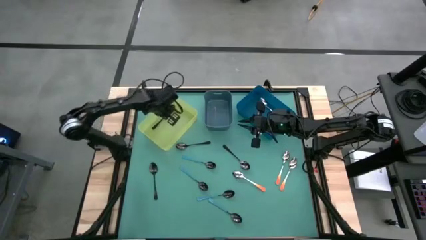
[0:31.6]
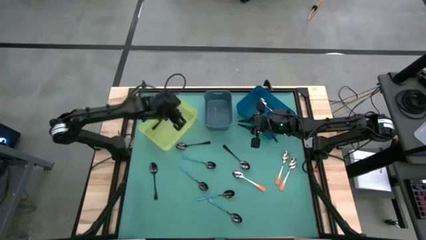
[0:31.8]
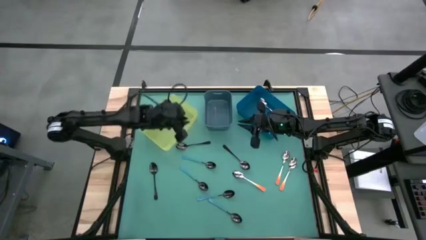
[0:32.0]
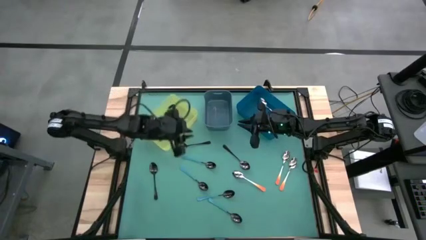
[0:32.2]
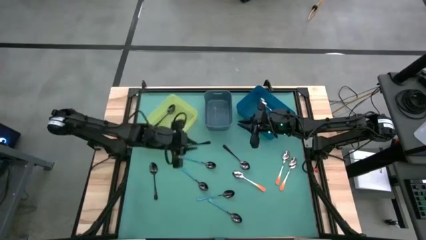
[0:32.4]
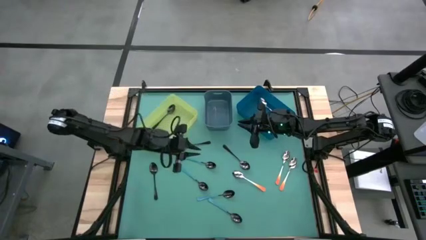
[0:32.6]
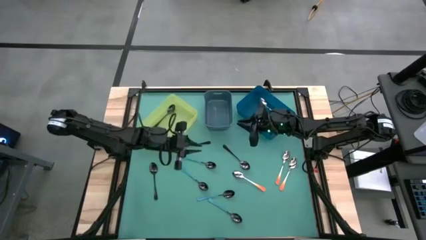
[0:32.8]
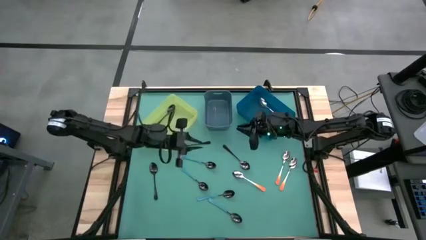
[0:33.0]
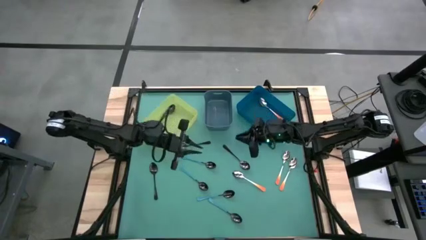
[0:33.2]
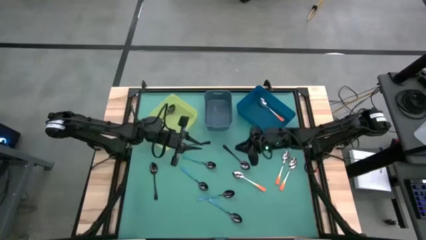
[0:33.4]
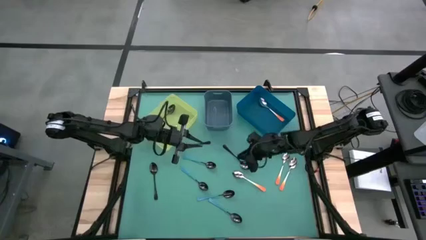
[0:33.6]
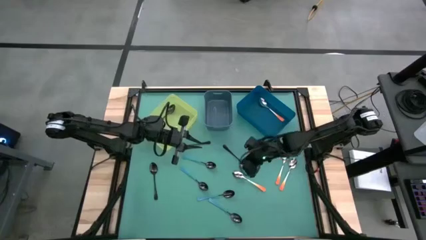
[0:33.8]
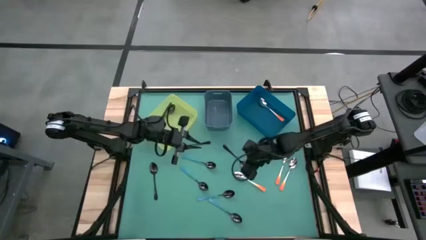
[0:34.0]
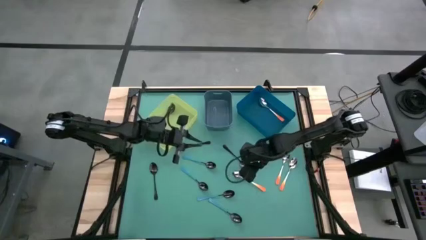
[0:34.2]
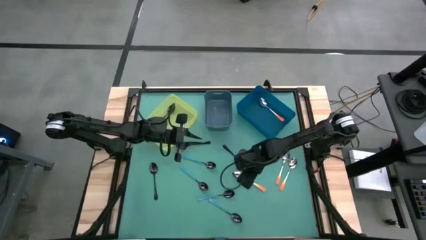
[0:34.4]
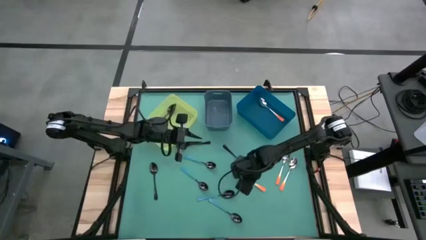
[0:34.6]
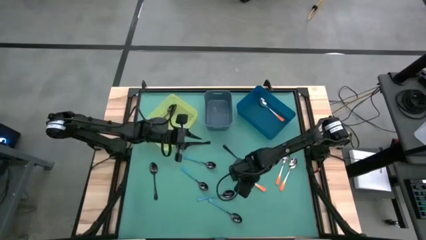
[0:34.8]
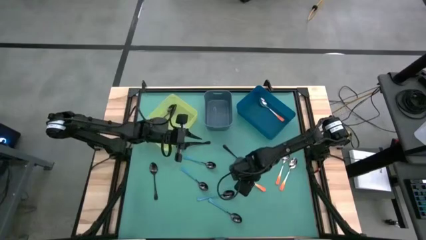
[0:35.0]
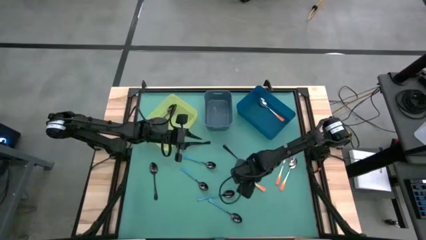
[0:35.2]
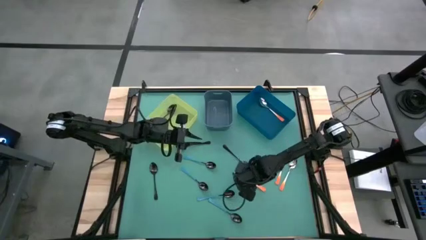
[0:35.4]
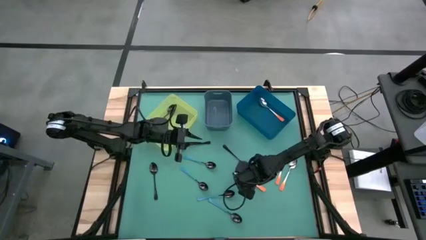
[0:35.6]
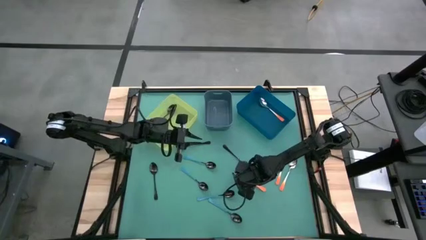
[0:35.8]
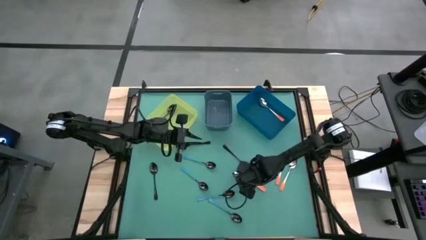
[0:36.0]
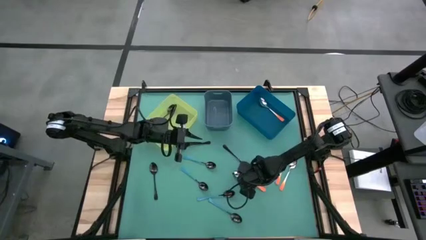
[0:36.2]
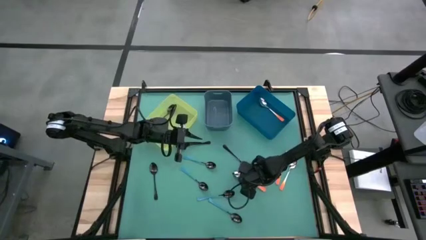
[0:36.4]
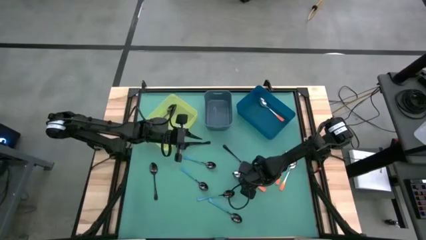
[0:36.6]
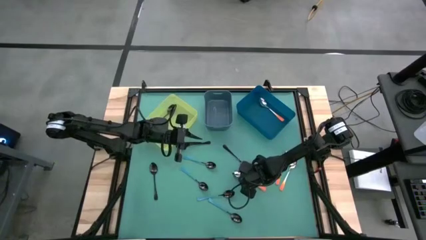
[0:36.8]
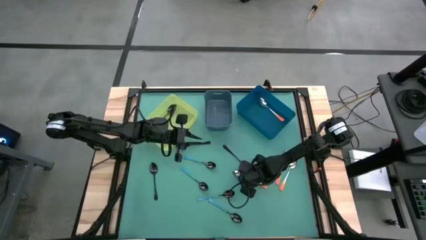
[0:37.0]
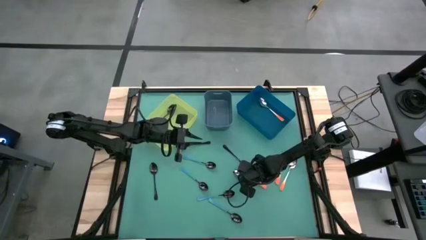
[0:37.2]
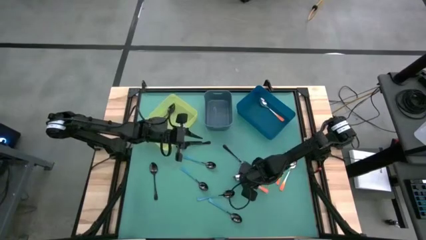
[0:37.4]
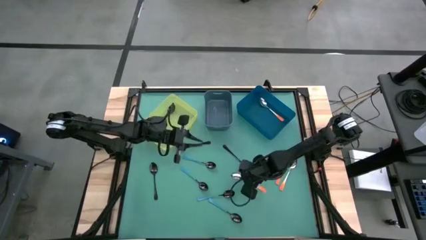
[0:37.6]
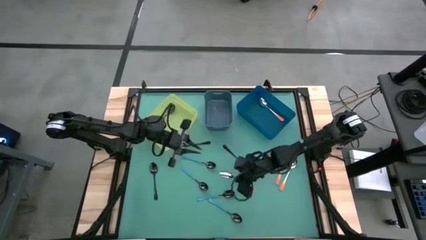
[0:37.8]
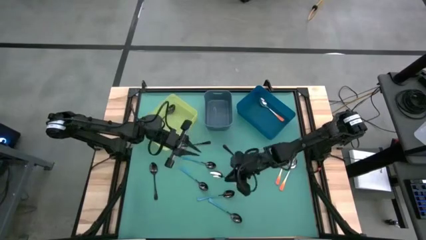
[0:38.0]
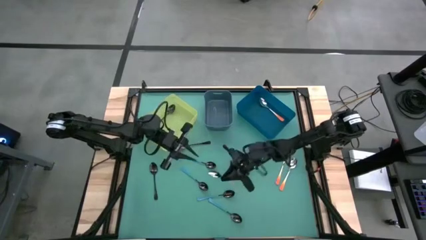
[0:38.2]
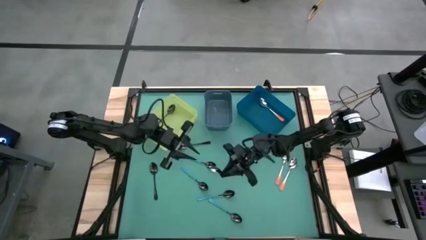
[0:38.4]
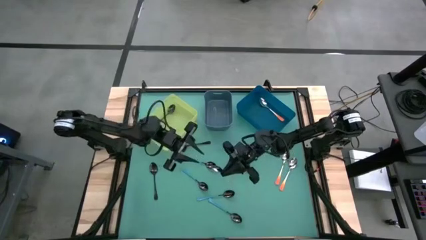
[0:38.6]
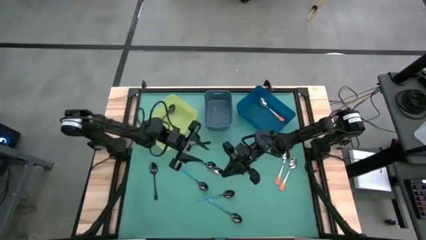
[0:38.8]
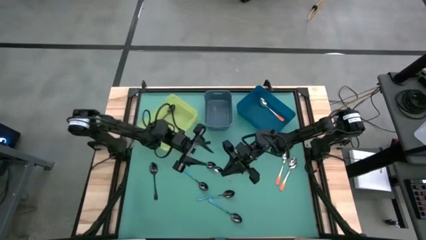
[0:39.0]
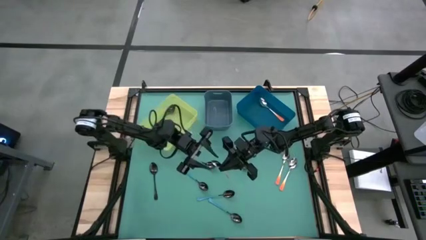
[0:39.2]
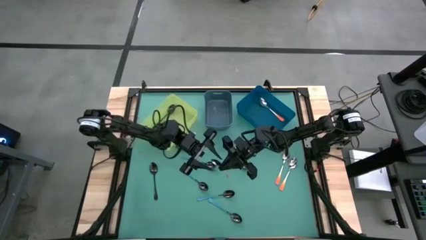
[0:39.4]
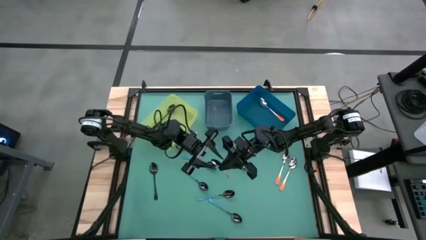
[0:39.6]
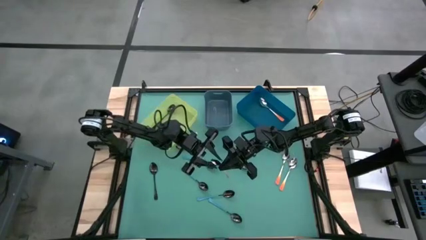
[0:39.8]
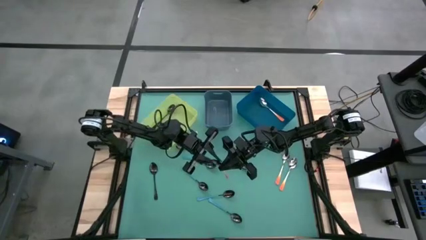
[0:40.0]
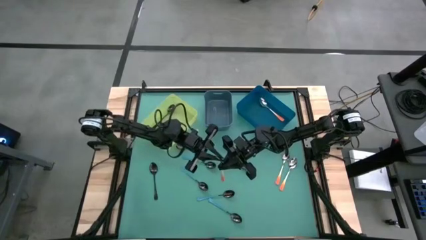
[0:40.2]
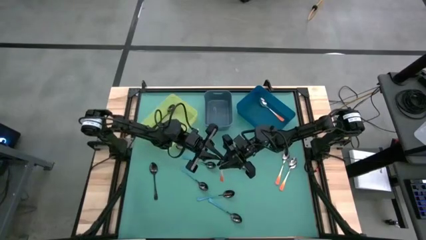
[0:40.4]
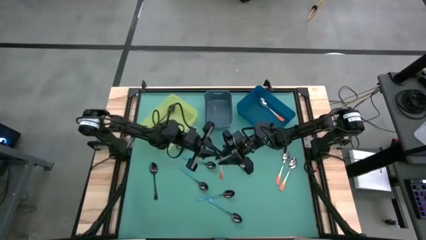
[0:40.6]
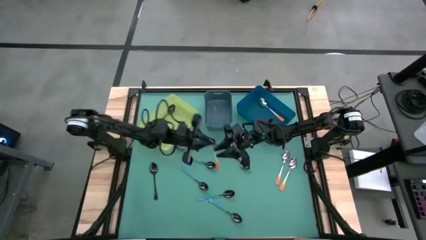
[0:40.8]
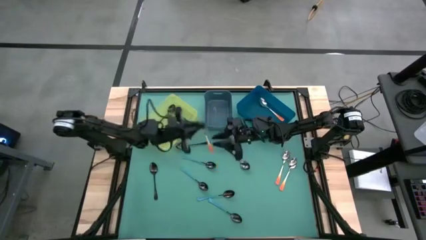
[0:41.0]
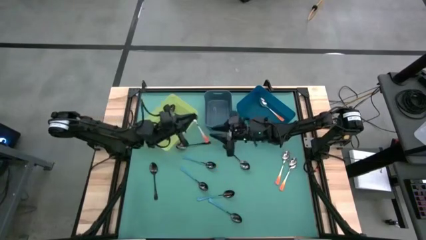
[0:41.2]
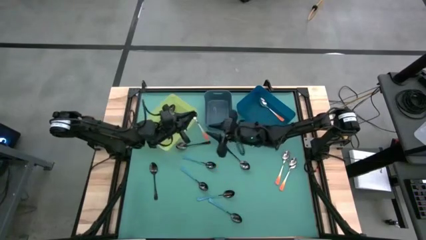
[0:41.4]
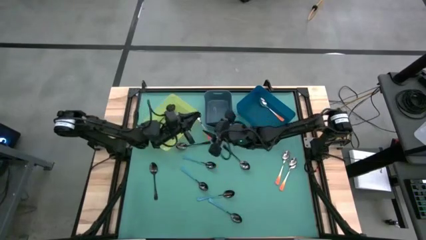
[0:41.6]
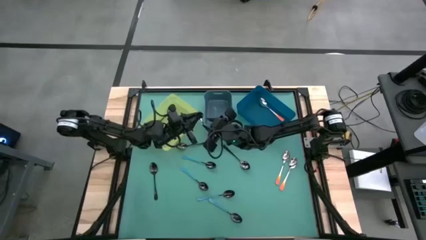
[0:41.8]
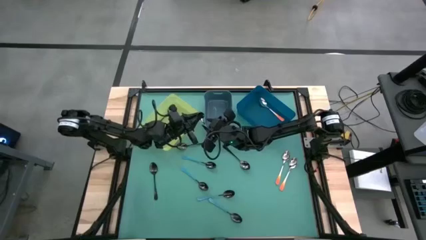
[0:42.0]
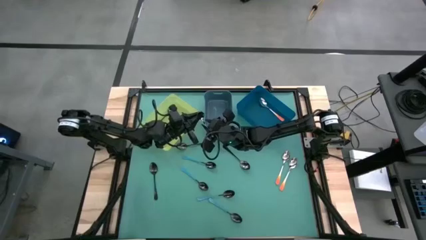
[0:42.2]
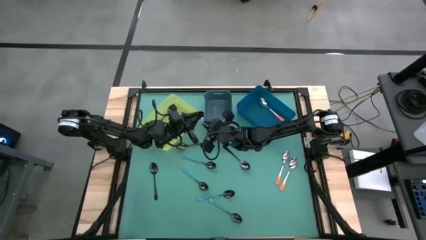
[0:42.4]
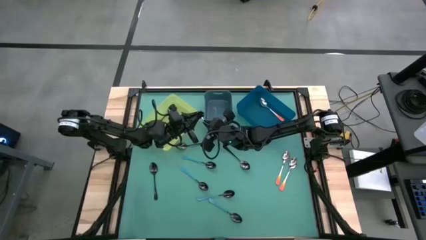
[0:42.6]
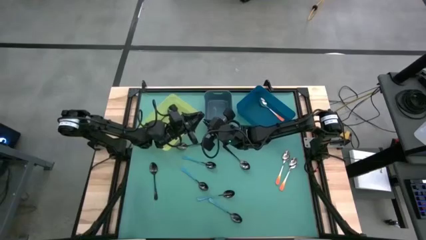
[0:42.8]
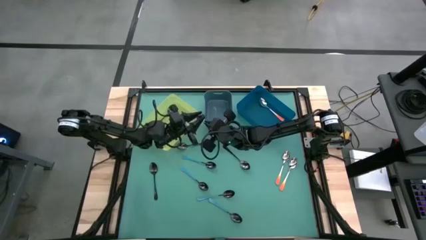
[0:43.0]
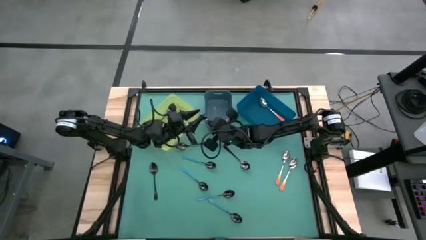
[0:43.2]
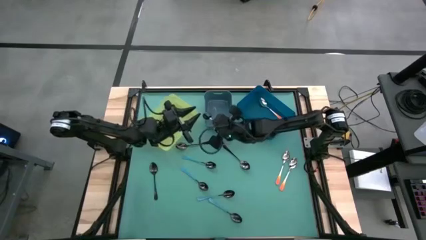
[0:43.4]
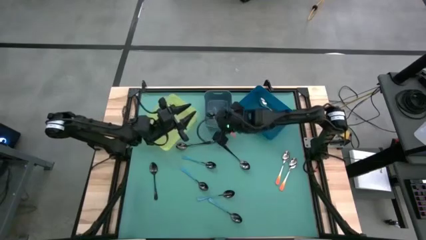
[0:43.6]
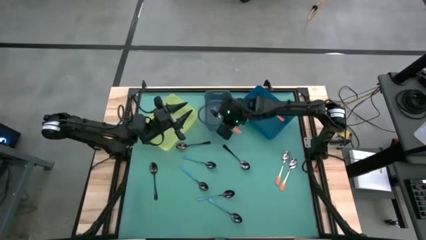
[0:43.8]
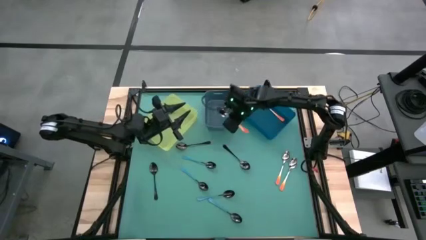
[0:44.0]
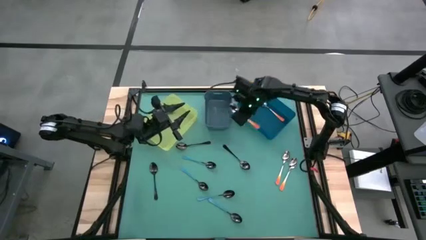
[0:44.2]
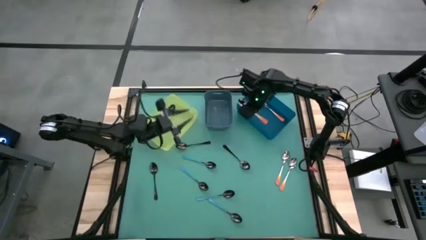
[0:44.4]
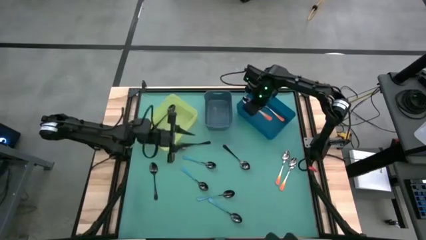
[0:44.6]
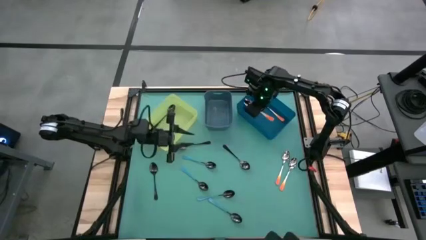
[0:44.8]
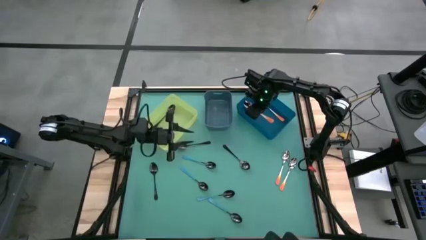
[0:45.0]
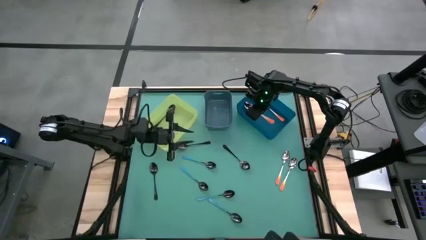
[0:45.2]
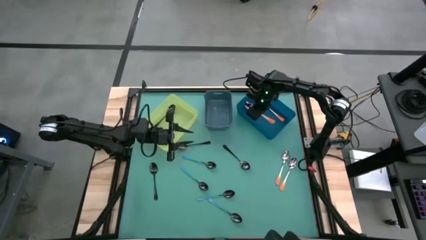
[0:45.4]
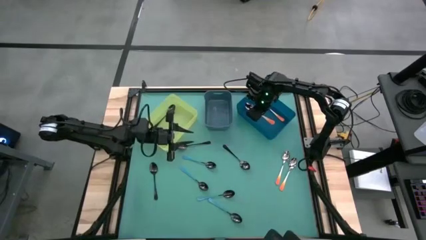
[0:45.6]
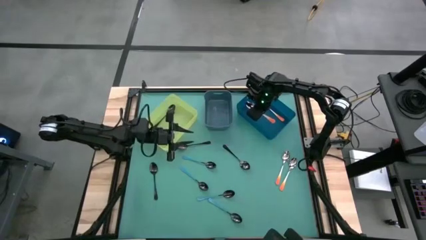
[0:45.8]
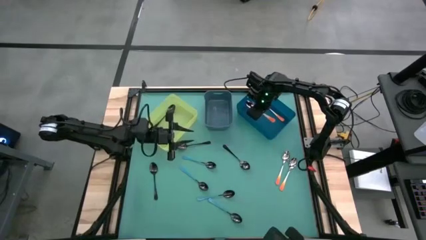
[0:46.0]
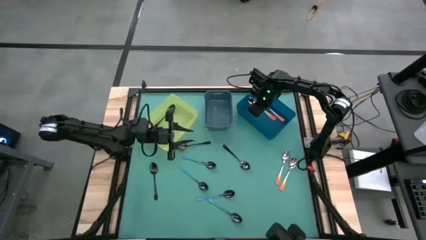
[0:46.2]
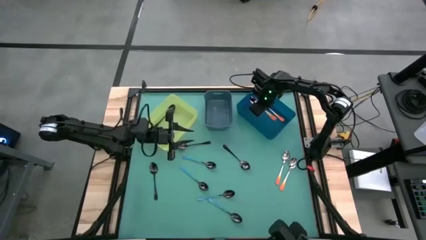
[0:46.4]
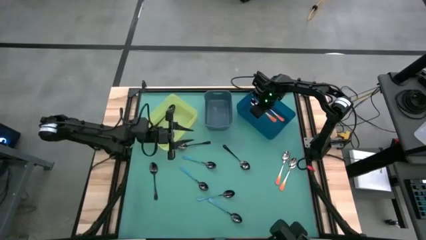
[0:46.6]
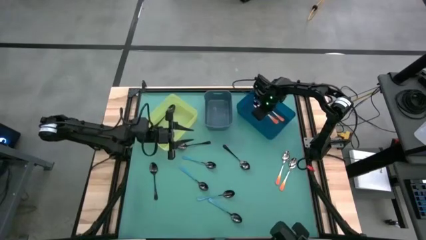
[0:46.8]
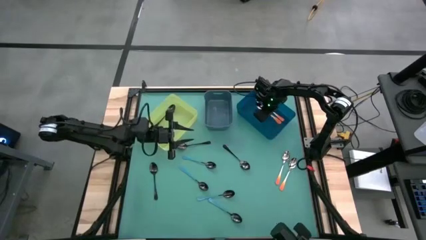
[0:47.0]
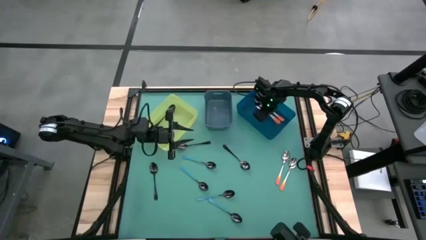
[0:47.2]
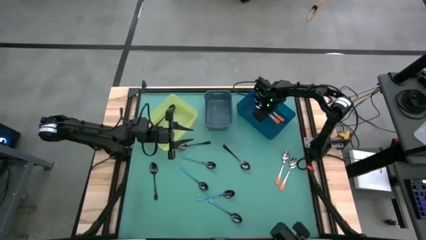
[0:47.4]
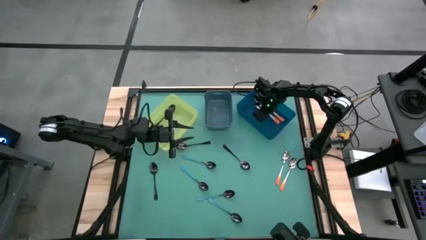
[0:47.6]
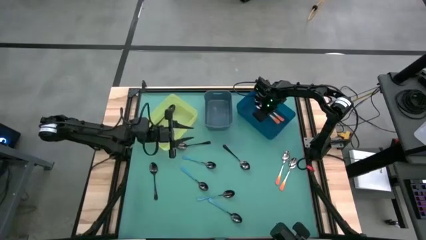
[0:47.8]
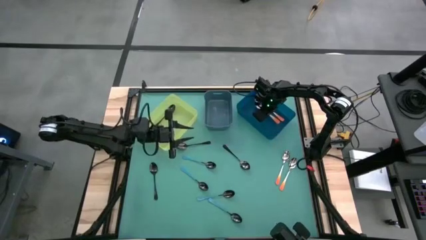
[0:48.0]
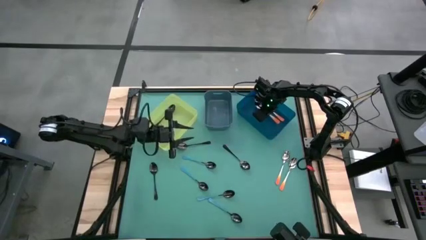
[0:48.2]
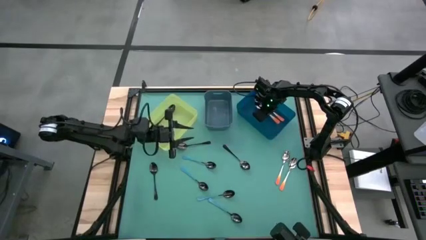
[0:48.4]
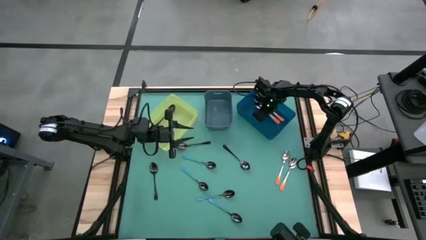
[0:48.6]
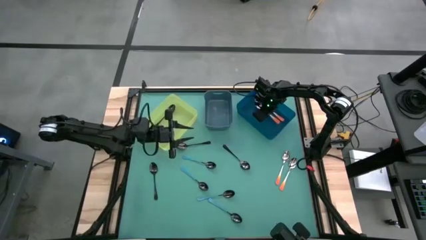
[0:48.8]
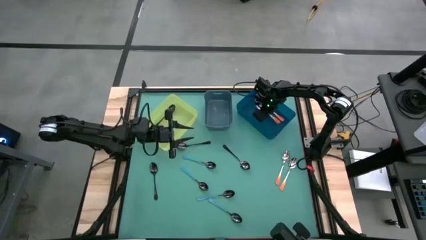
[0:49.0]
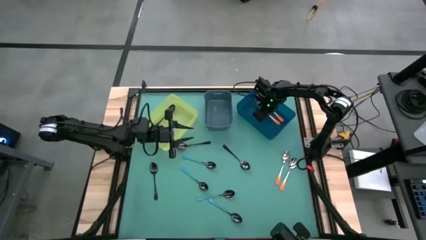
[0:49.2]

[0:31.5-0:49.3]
Task: Sort silverware by color (type)
Put the orange spoon into the blue bin
